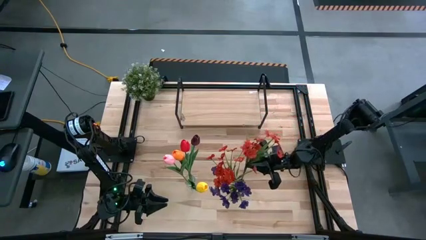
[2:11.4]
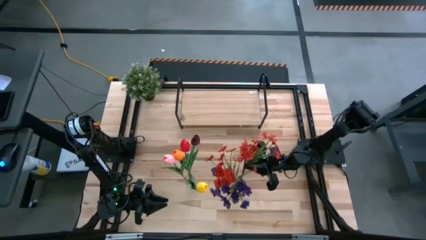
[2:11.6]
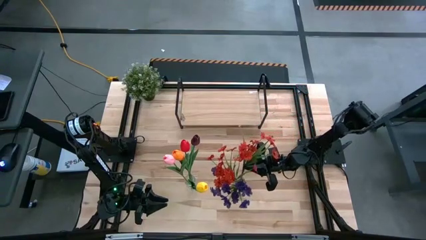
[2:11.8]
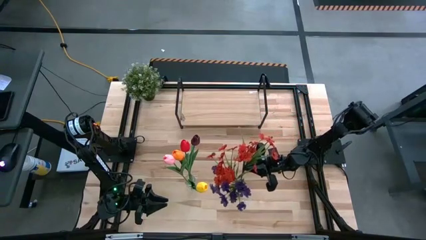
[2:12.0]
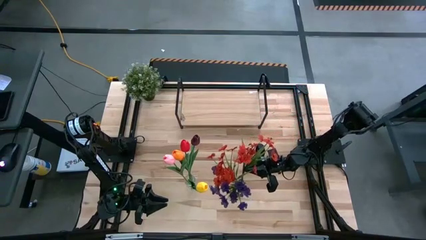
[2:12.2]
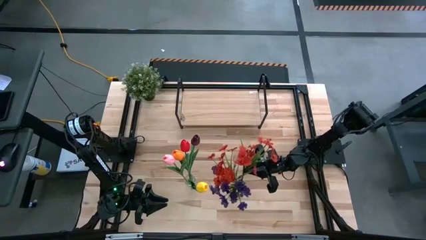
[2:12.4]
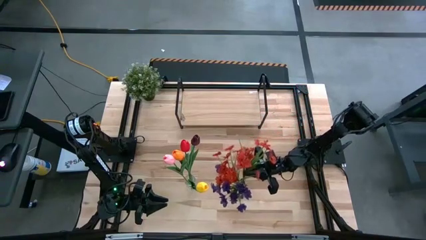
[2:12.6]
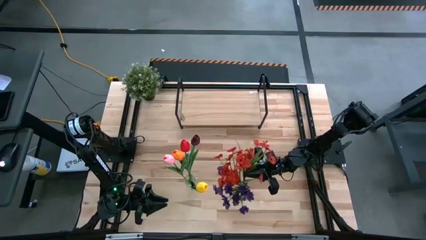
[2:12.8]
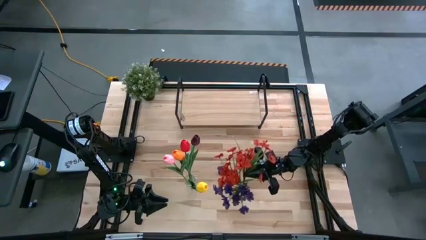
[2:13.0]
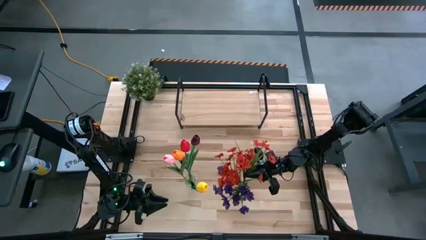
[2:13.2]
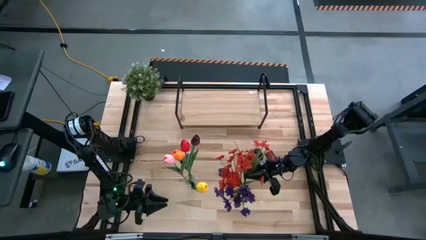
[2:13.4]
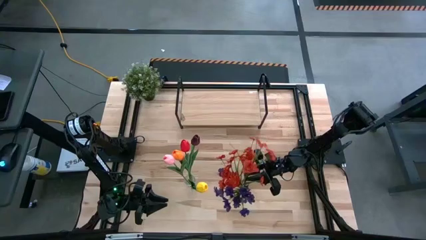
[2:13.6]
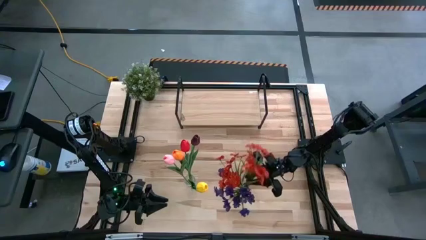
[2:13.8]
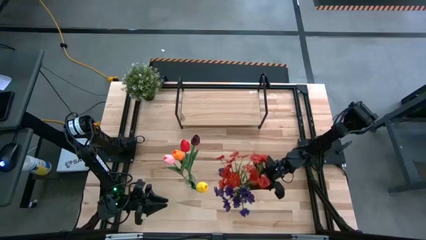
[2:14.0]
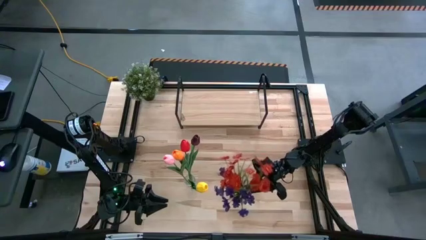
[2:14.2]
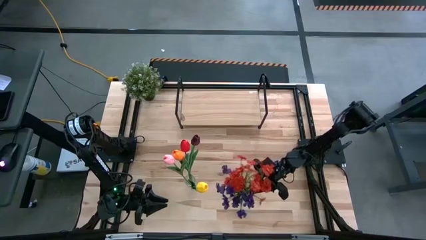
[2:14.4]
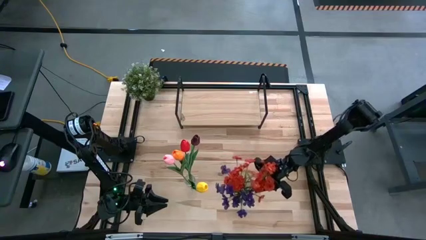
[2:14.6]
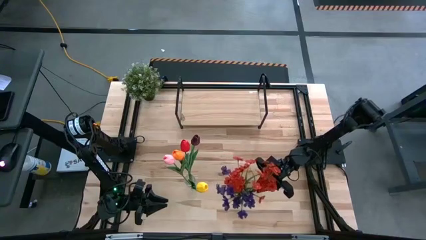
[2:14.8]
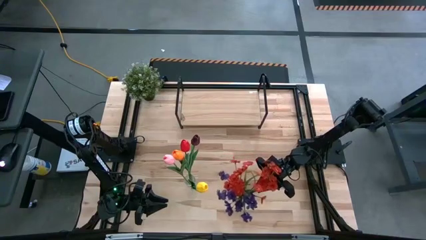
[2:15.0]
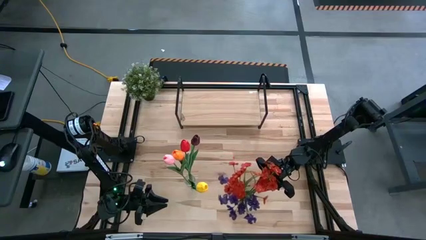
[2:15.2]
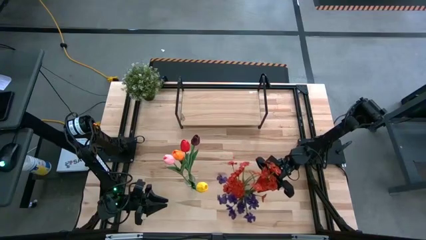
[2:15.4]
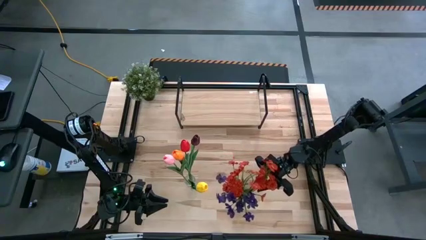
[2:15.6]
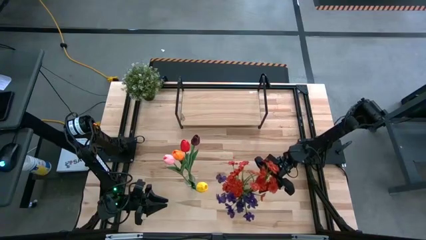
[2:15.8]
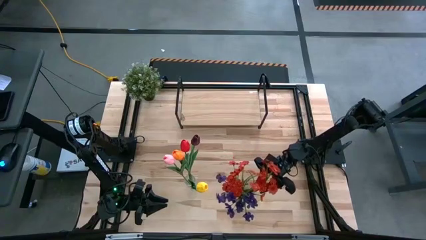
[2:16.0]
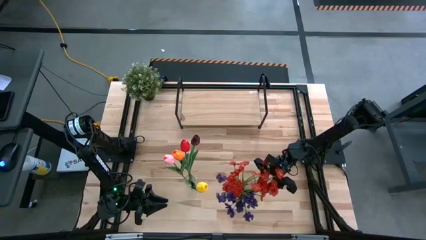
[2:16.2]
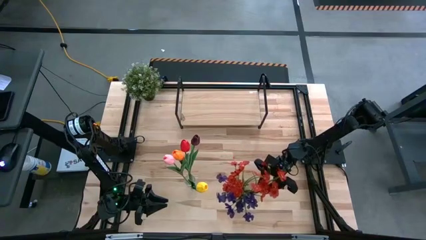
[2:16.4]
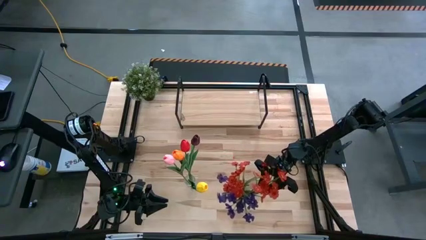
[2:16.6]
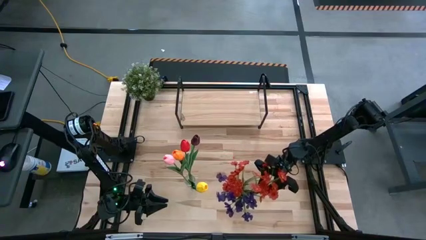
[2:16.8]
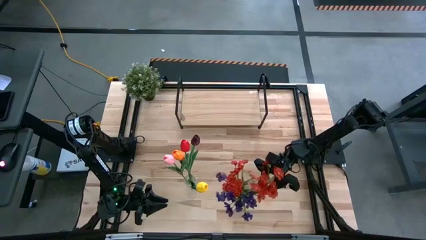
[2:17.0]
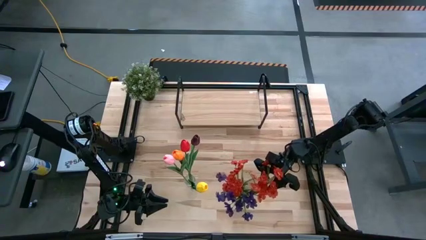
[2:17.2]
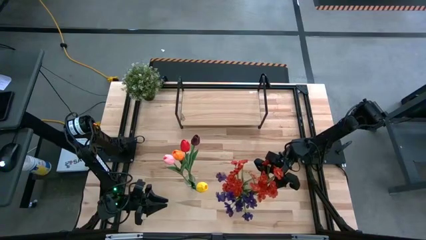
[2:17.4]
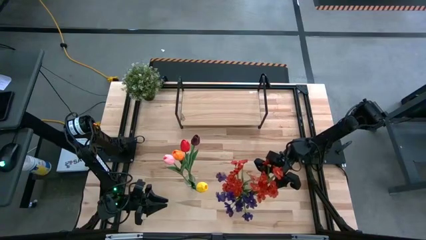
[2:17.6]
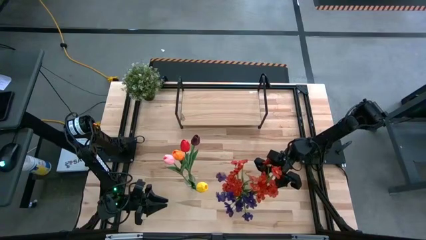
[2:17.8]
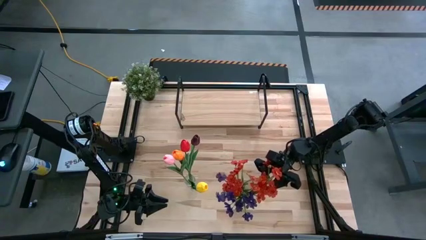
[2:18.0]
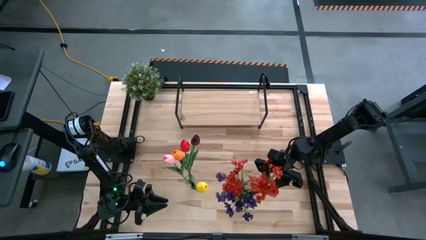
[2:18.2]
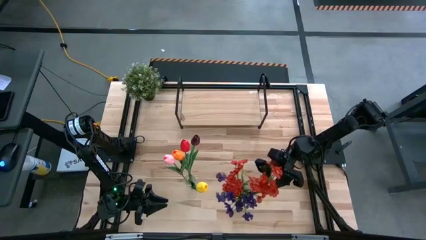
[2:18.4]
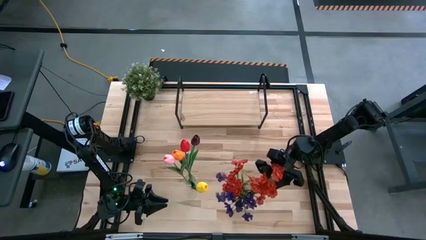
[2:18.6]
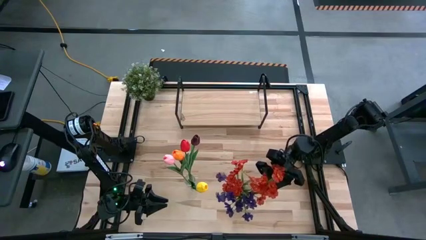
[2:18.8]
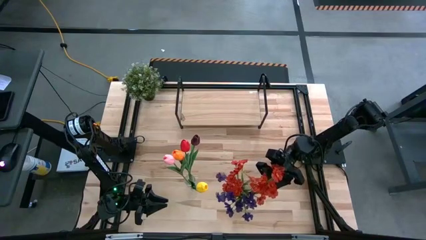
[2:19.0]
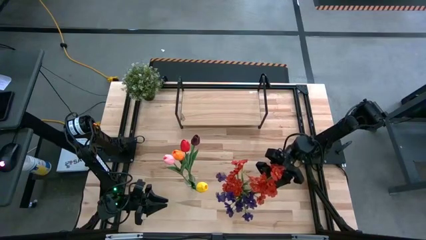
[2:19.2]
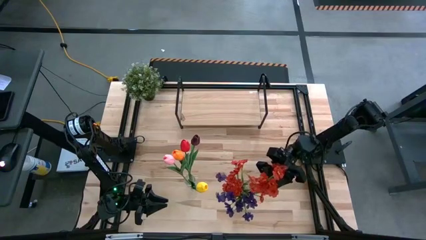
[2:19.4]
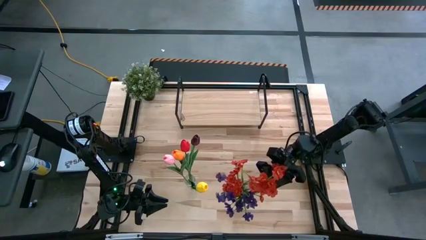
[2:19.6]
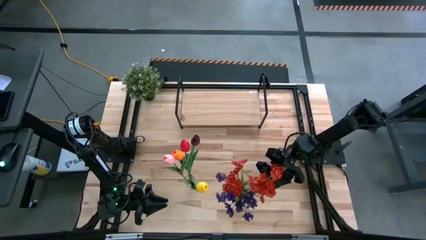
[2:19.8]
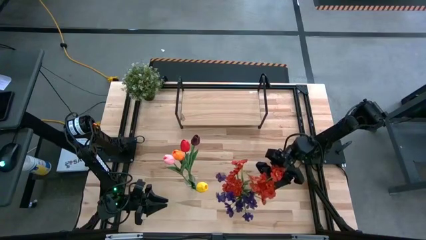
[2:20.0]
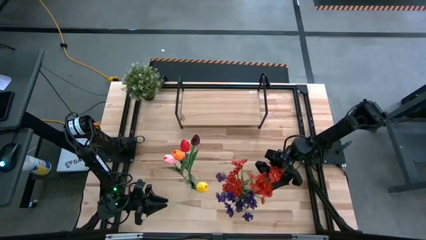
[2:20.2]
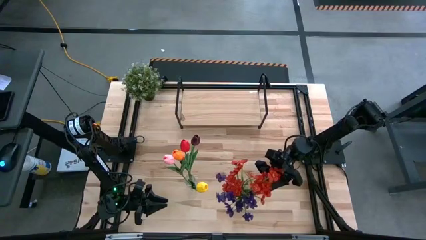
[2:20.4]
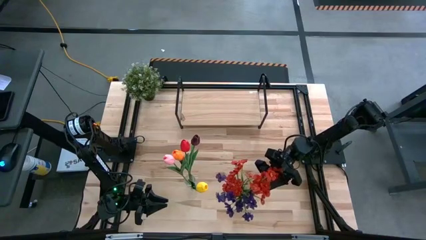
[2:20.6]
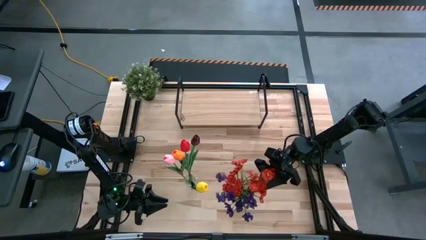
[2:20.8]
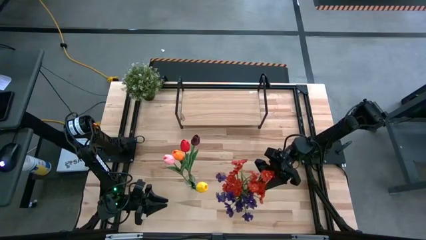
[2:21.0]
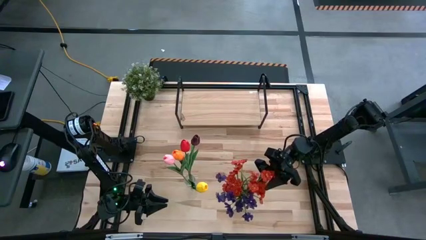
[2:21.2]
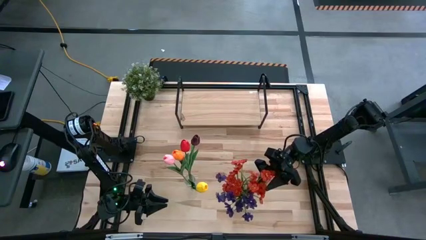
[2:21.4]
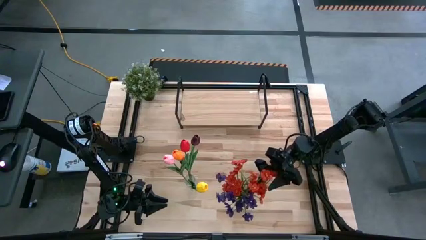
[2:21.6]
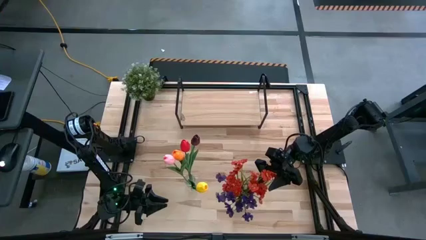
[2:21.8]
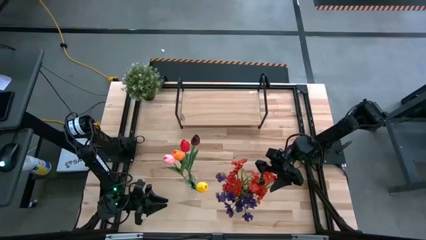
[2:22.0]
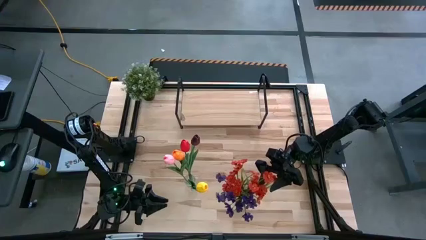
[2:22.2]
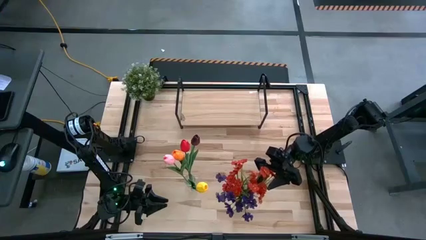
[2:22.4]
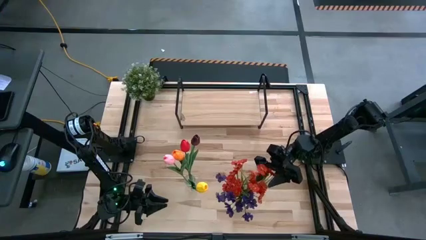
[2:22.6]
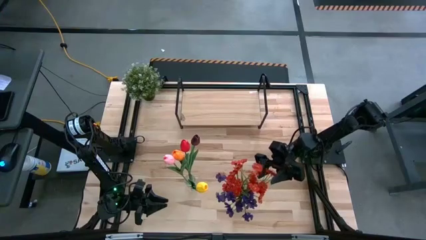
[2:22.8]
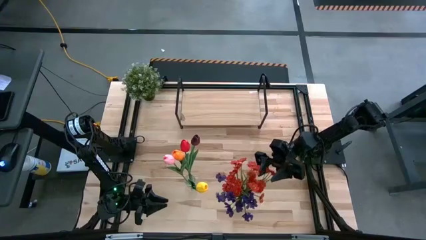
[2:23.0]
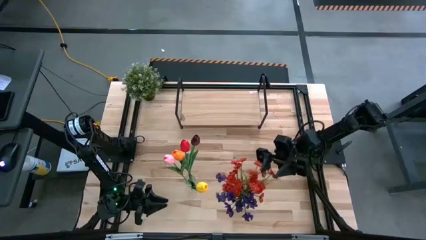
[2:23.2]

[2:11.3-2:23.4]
Task: Pick and place flowers into a vace then onto a shelf
Put the red flower into the right transparent vase
